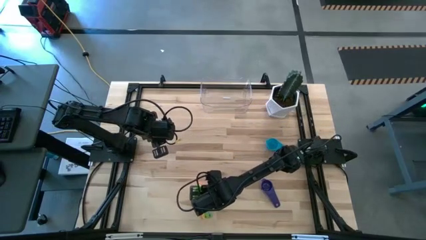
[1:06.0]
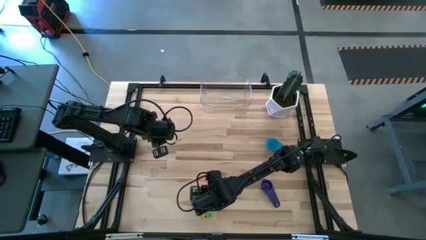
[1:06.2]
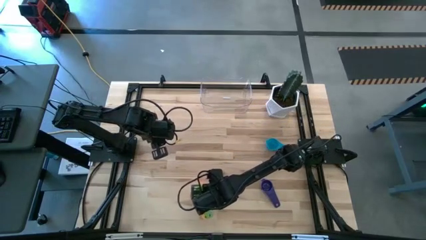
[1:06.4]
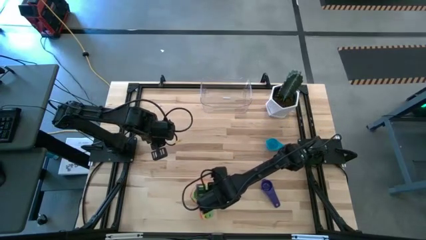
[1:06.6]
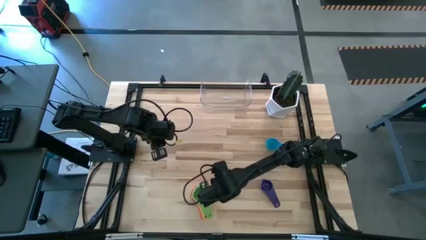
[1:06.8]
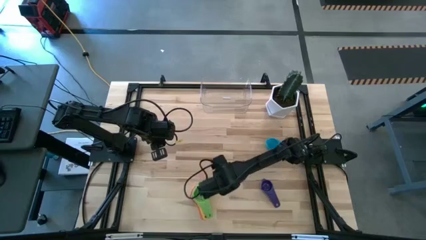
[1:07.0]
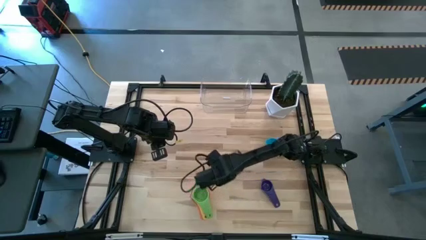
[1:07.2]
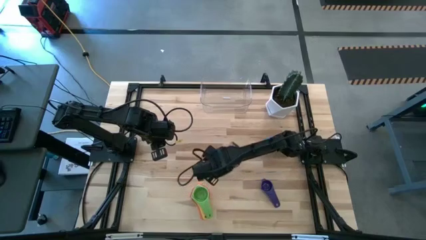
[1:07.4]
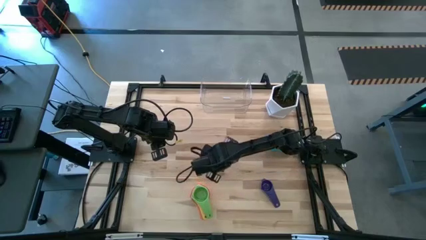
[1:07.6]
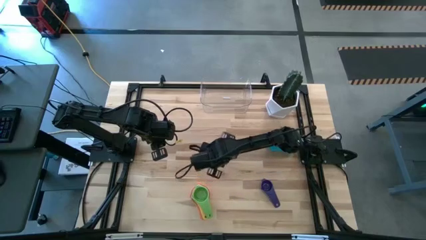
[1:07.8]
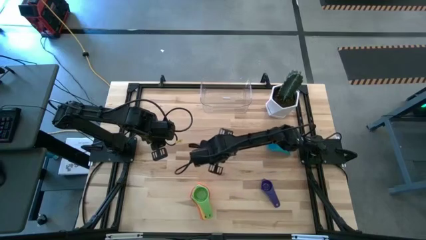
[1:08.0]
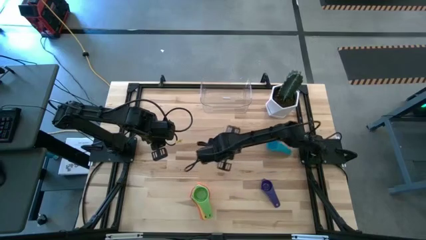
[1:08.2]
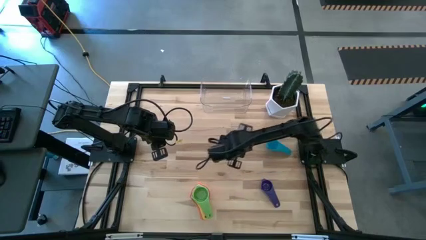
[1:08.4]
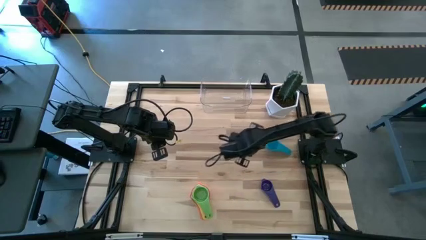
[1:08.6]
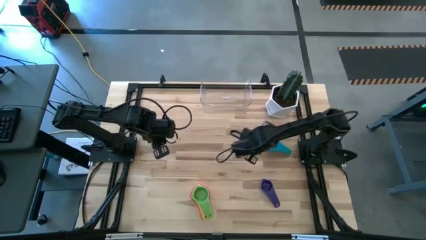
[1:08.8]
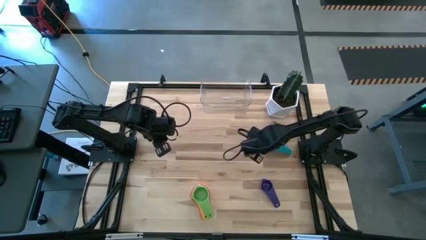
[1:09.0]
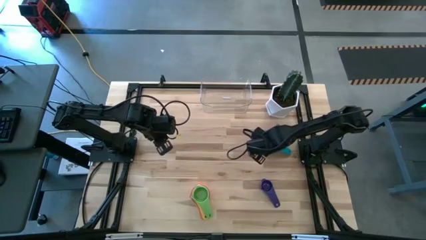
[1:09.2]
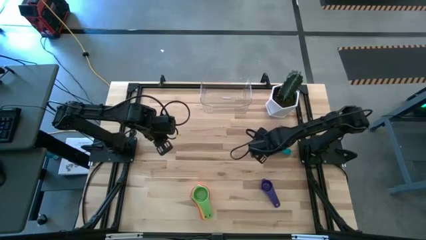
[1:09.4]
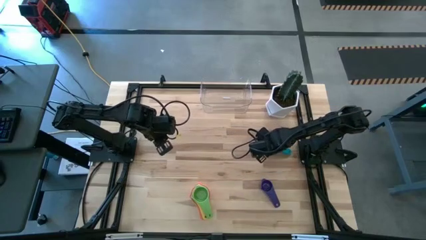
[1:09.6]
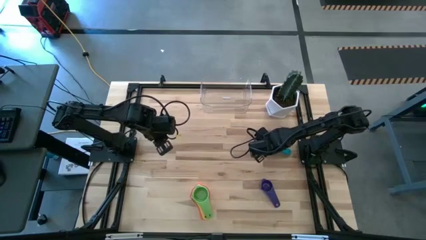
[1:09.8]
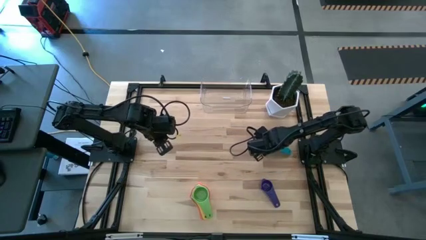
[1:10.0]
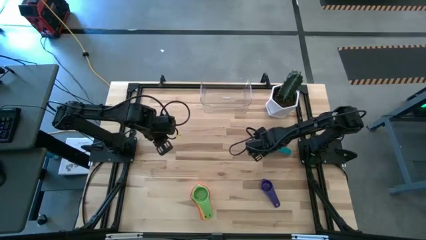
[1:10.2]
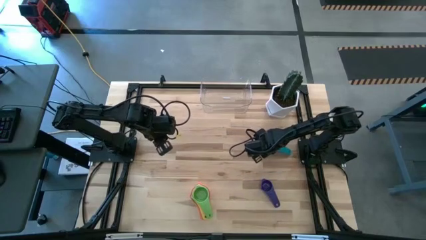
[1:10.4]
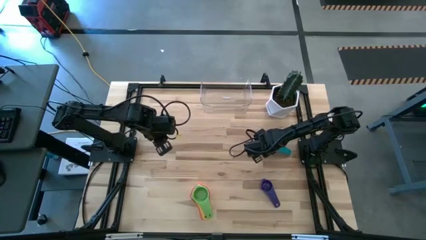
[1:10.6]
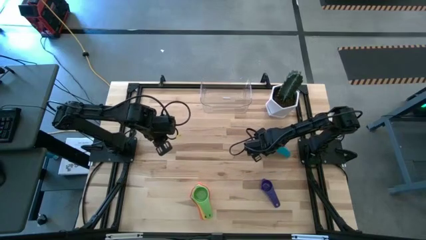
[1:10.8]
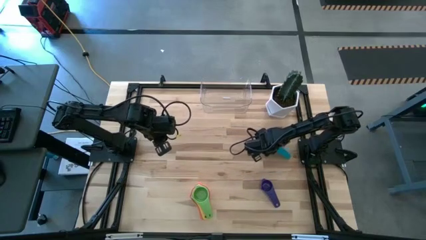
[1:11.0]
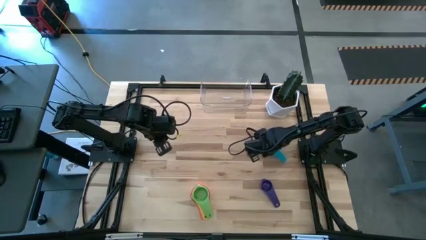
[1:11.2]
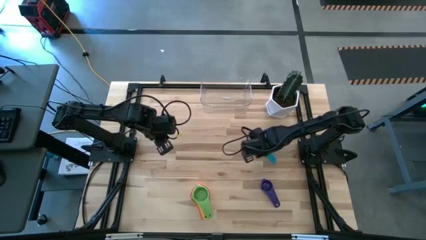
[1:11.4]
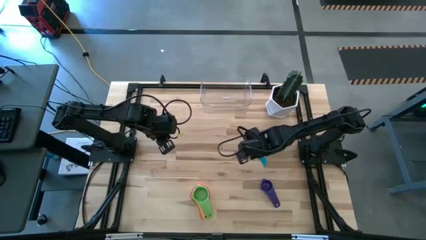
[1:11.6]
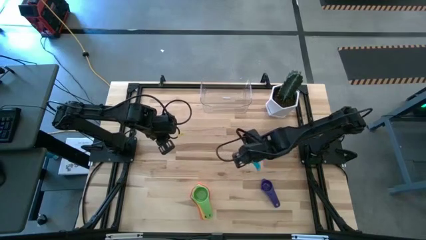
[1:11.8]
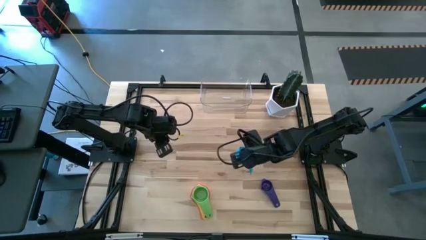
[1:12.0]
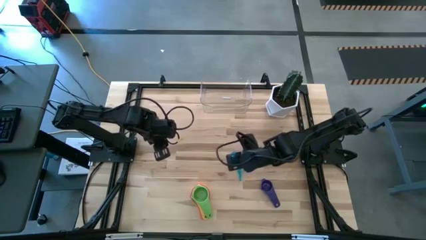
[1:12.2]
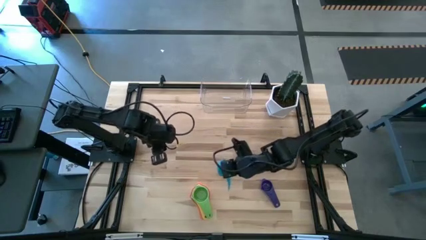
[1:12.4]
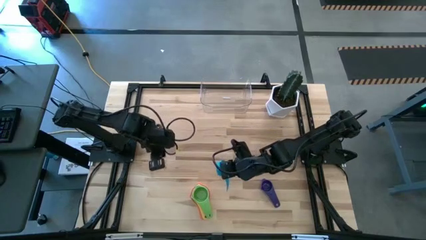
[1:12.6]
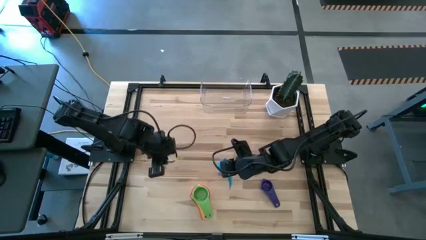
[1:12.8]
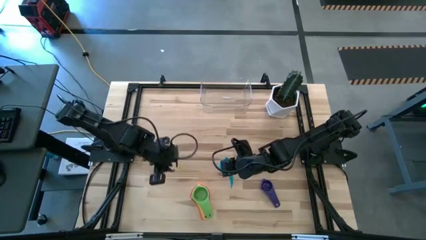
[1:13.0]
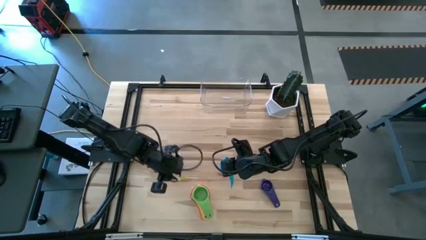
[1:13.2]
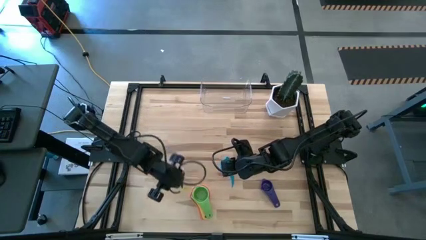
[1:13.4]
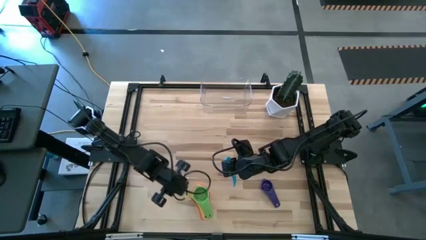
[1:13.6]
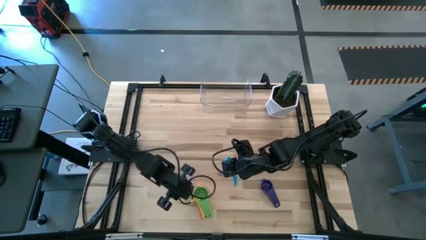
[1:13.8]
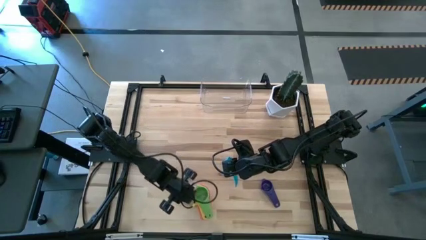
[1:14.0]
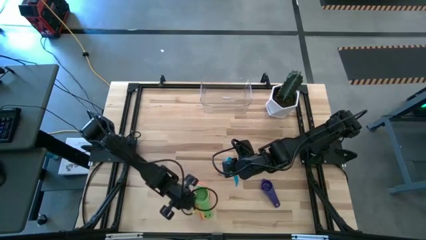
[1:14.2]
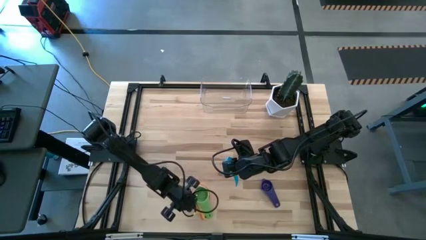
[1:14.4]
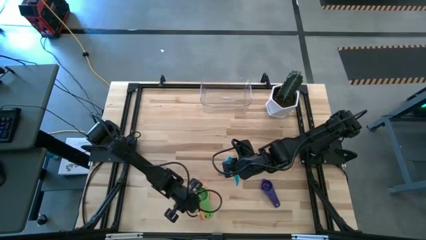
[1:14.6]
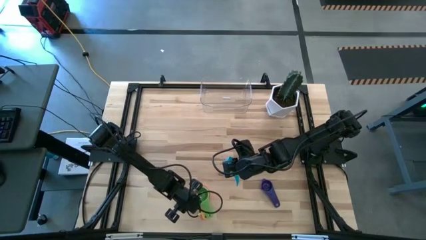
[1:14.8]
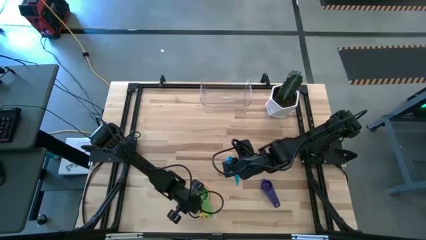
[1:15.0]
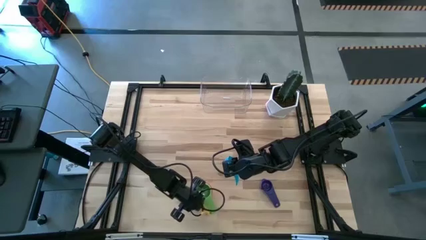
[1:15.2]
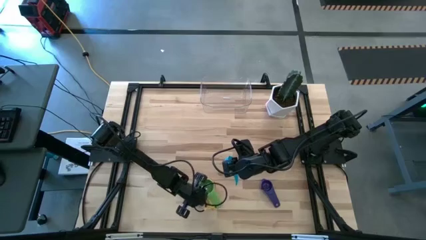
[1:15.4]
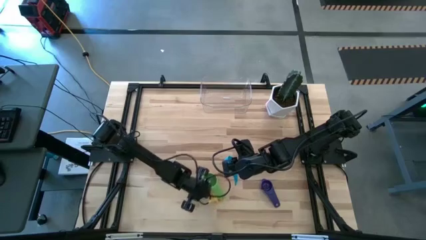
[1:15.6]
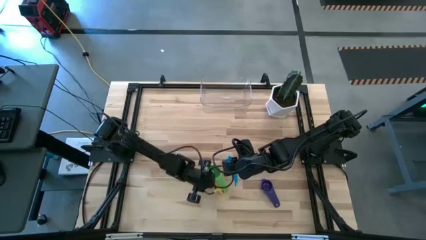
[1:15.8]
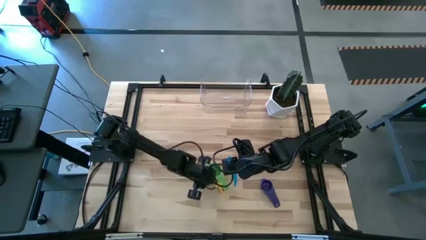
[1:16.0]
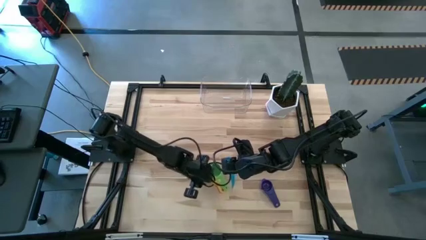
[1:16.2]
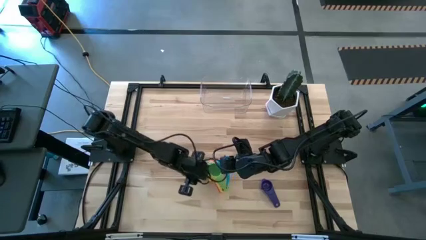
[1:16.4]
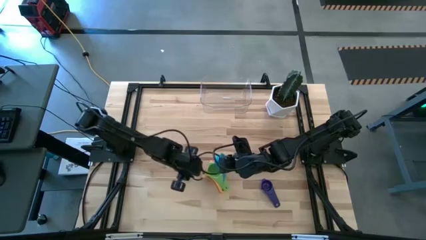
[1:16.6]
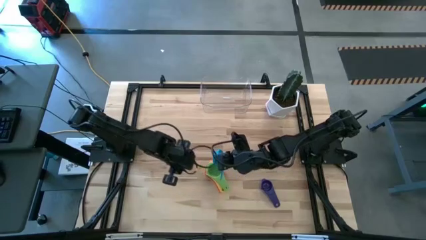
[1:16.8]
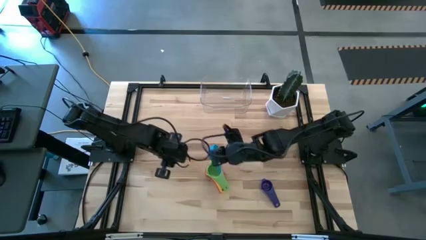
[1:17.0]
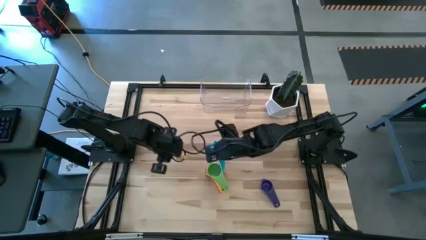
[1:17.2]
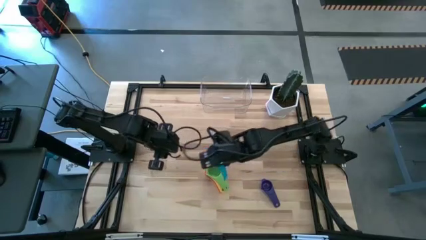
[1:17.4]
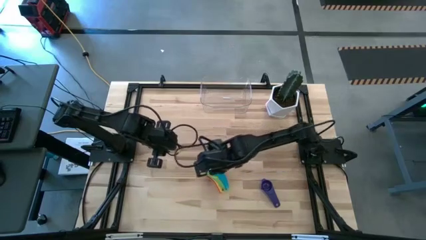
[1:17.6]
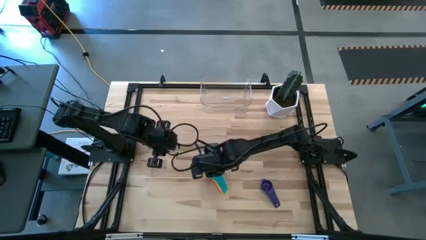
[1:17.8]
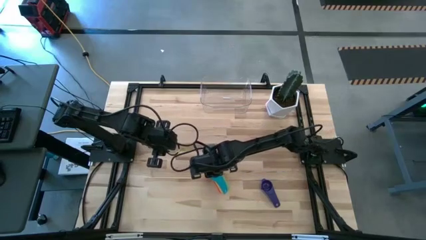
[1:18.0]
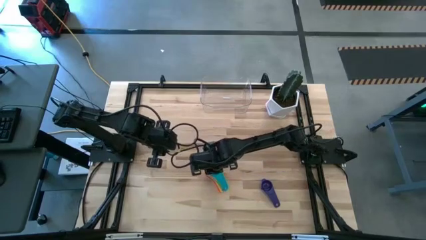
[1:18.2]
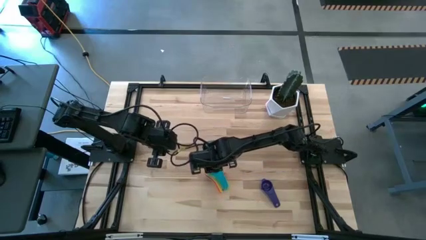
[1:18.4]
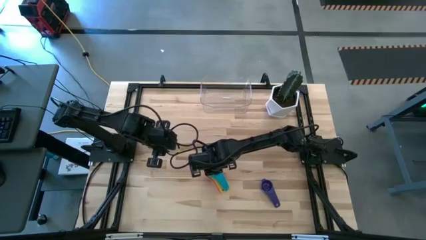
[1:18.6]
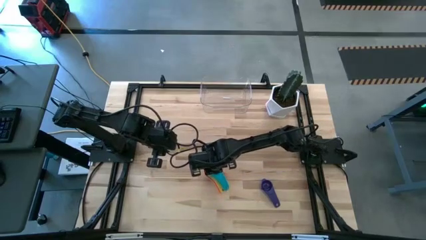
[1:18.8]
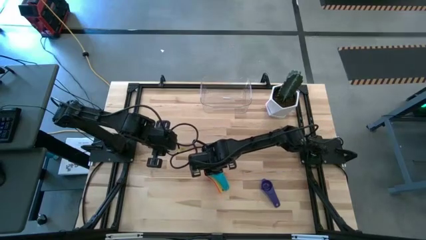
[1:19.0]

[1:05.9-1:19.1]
Task: Nest measuring cups in basket
Stack the light blue measuring cup on top of the green measuring cup

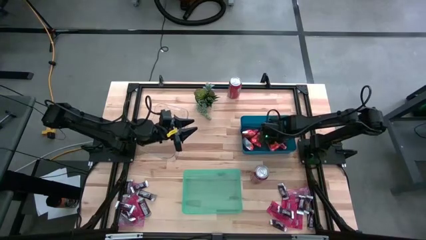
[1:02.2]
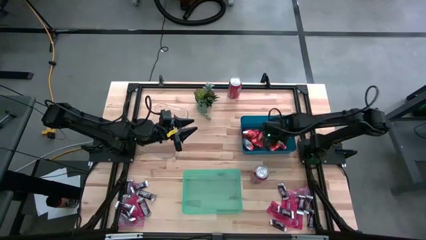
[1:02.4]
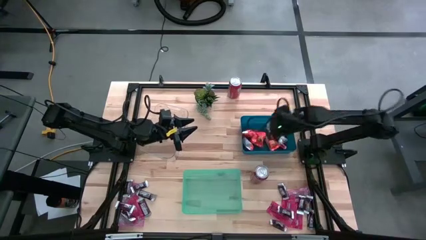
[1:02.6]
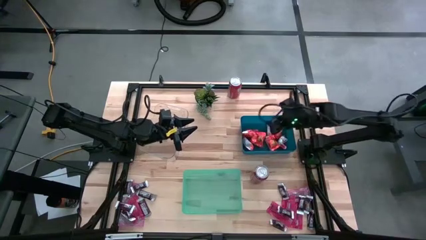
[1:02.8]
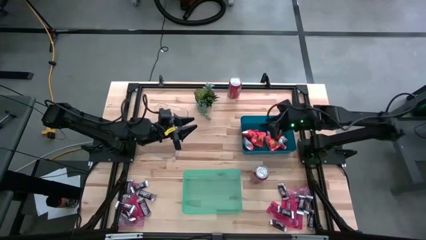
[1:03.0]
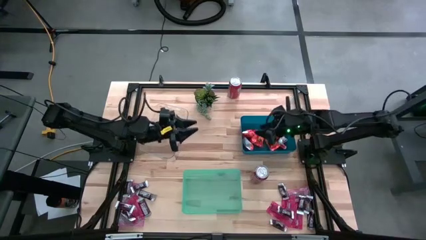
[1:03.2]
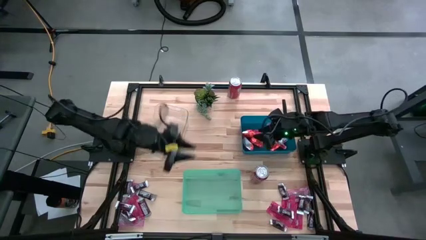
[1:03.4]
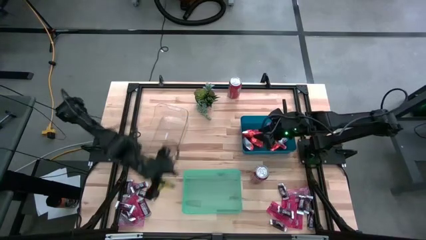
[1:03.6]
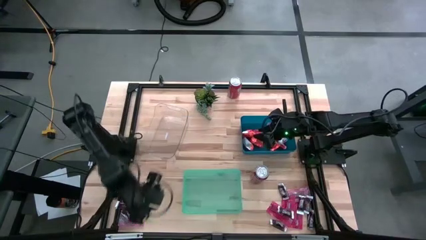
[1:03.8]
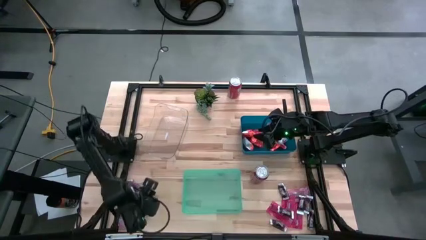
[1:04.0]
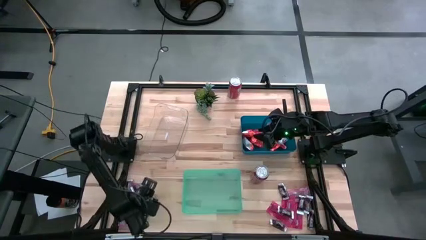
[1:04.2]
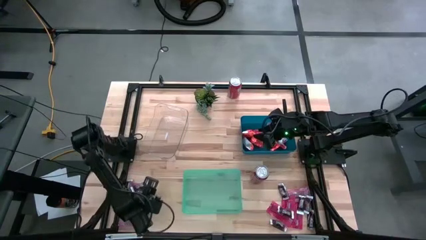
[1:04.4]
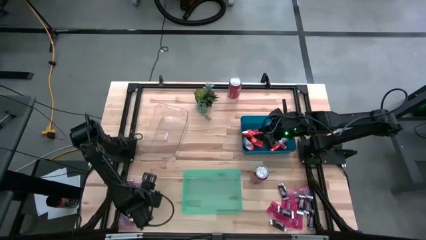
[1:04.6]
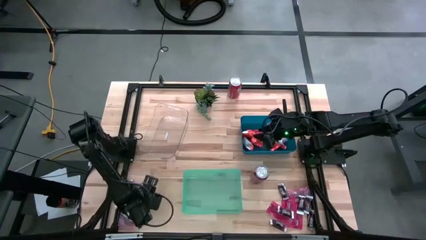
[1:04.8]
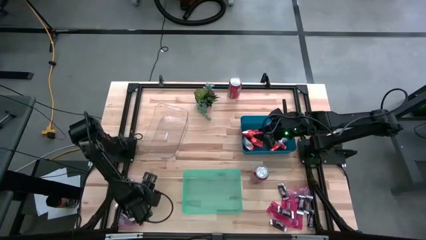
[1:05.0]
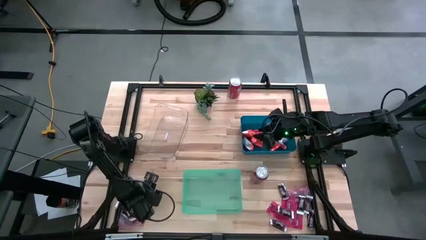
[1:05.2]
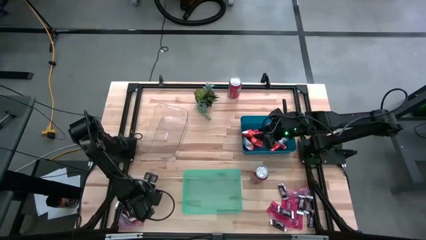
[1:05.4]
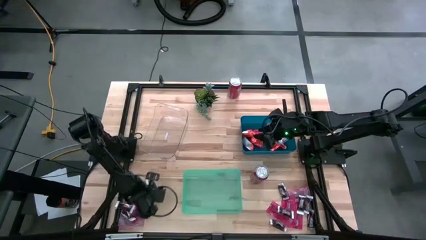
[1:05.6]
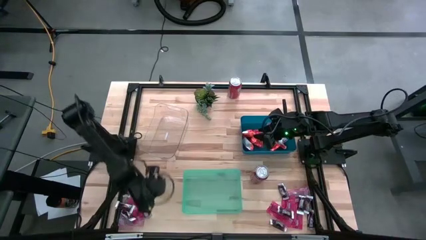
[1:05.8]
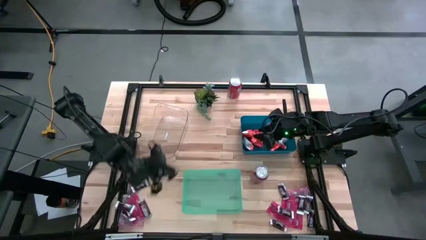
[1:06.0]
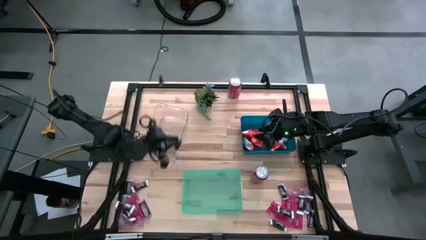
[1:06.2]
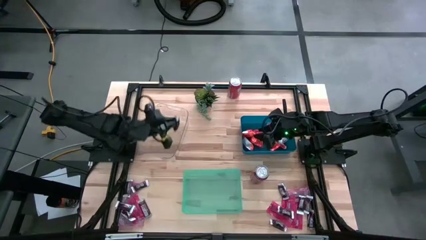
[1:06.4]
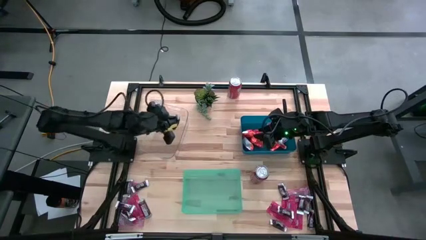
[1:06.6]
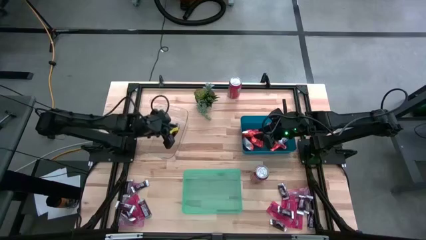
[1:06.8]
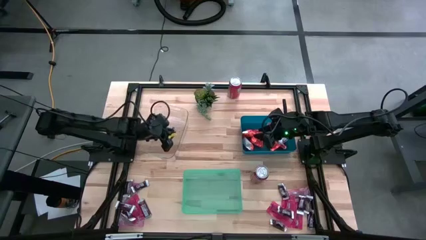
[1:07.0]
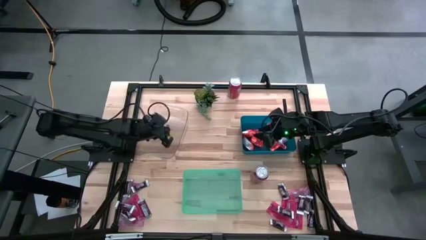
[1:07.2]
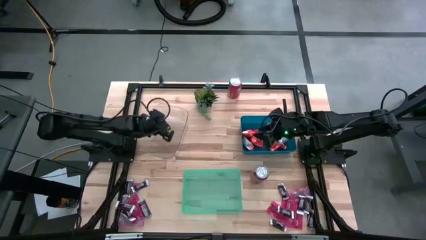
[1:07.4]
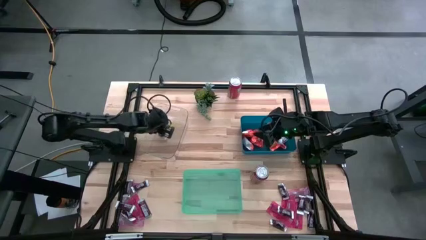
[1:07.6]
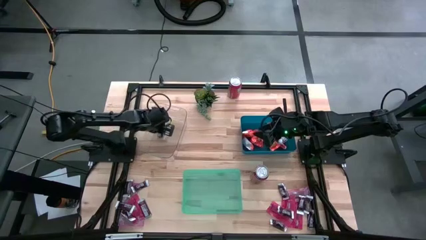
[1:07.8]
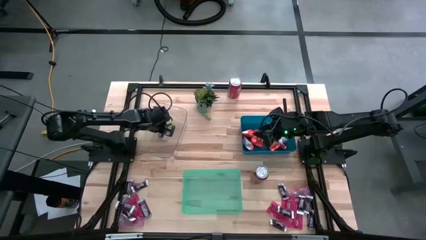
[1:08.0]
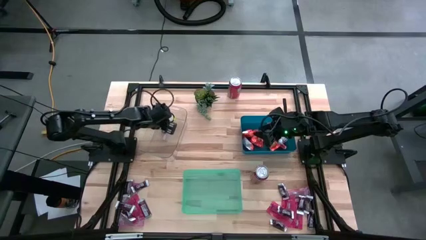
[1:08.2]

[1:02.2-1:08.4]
Task: Sort candy
Put the brown chocolate bar into the transparent bin
